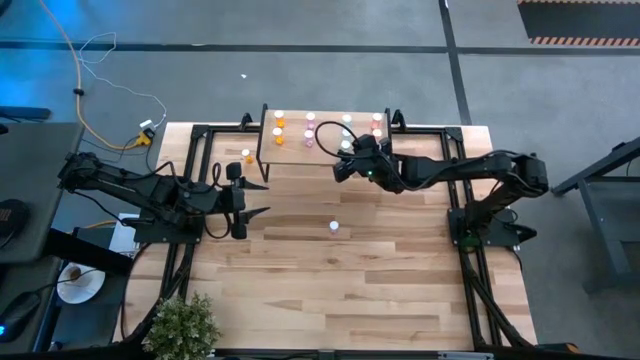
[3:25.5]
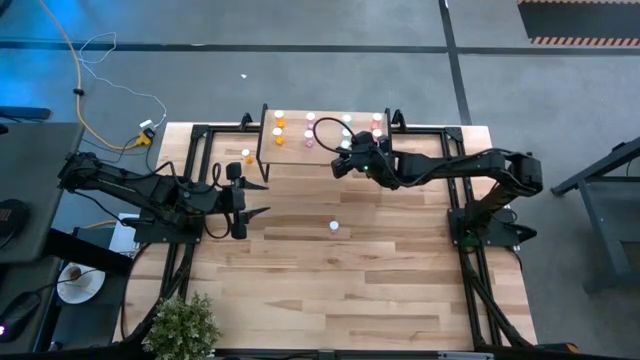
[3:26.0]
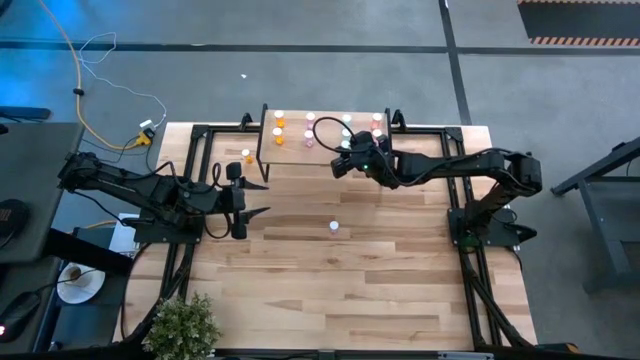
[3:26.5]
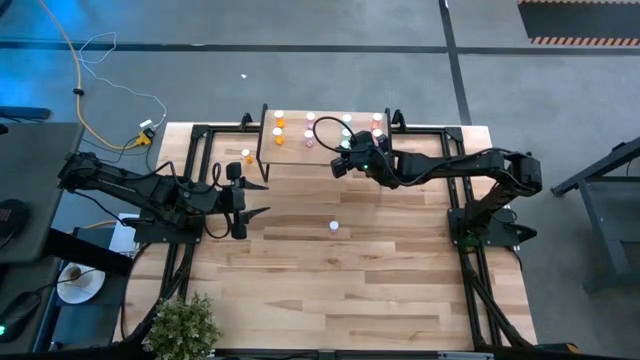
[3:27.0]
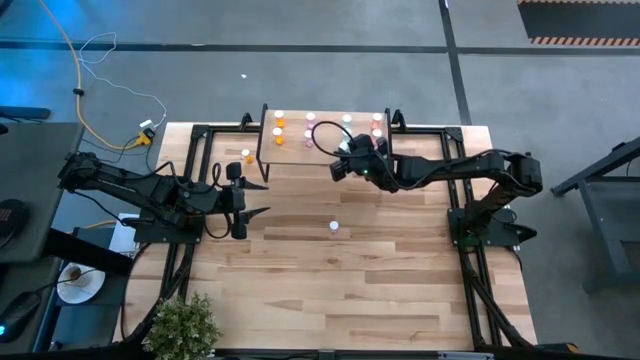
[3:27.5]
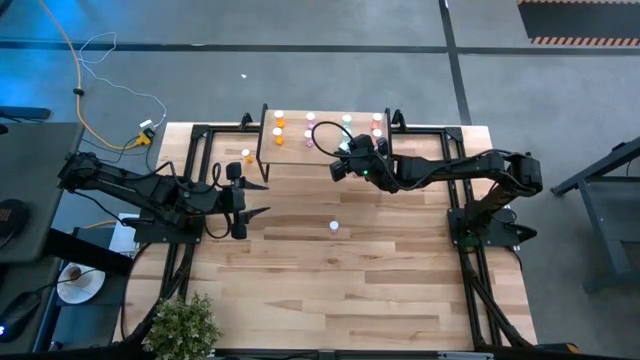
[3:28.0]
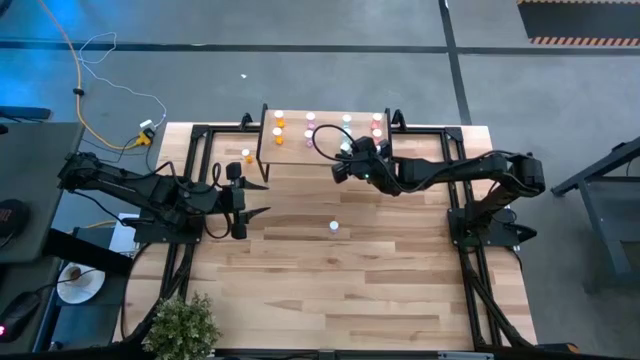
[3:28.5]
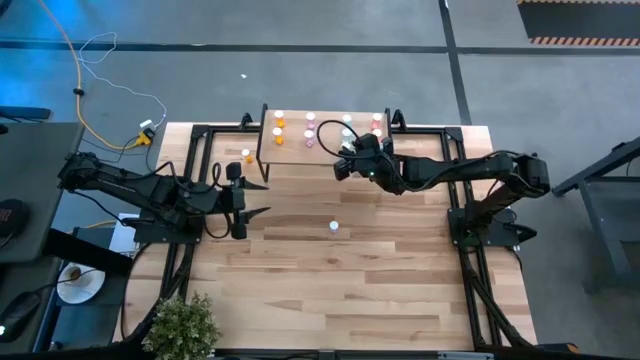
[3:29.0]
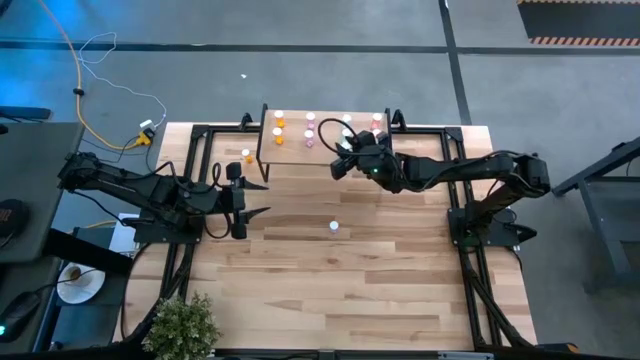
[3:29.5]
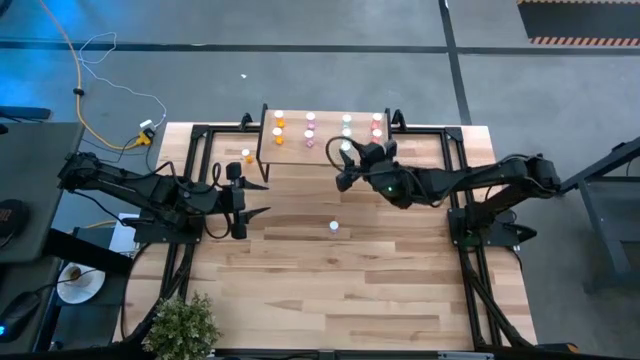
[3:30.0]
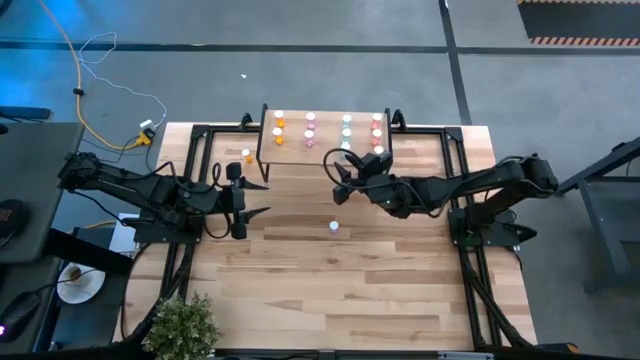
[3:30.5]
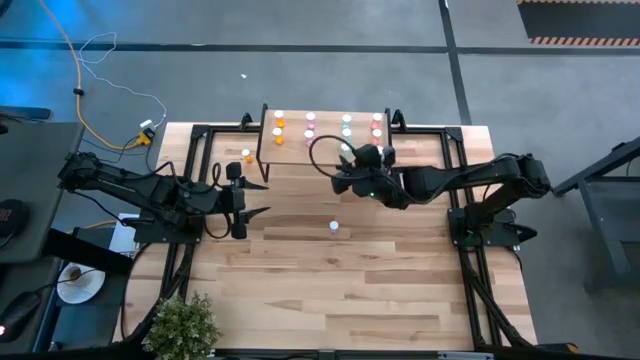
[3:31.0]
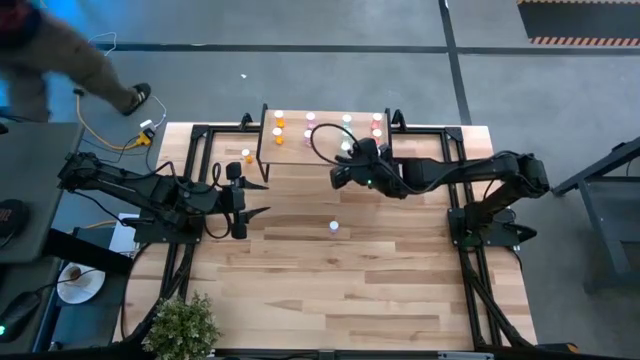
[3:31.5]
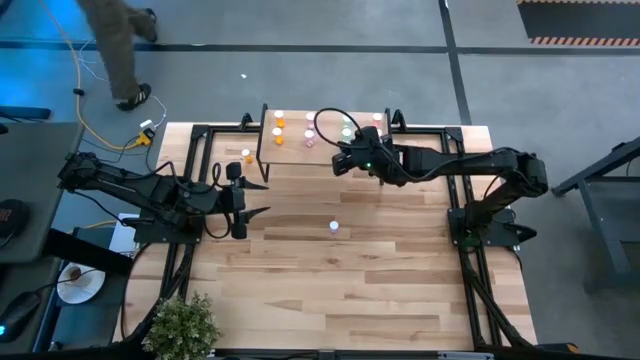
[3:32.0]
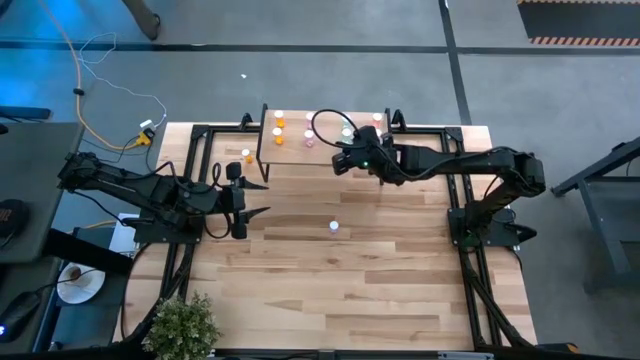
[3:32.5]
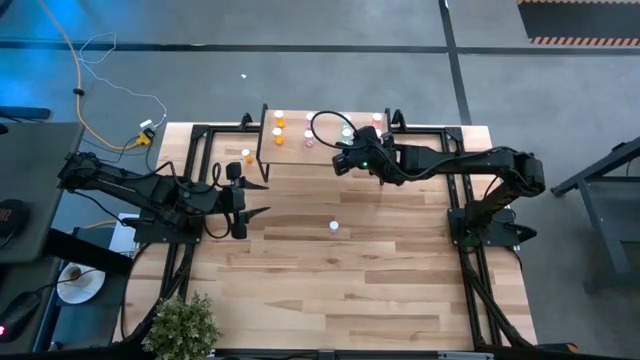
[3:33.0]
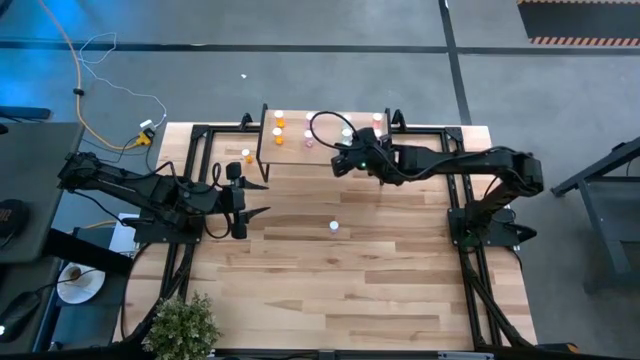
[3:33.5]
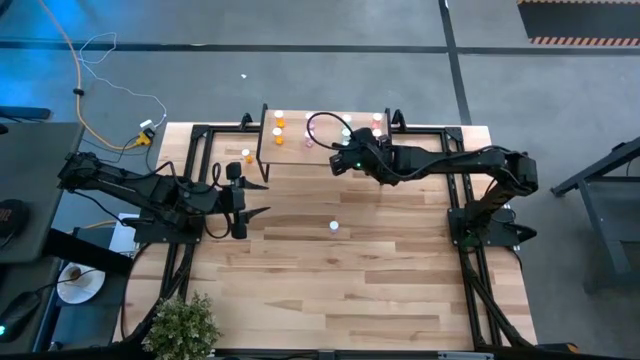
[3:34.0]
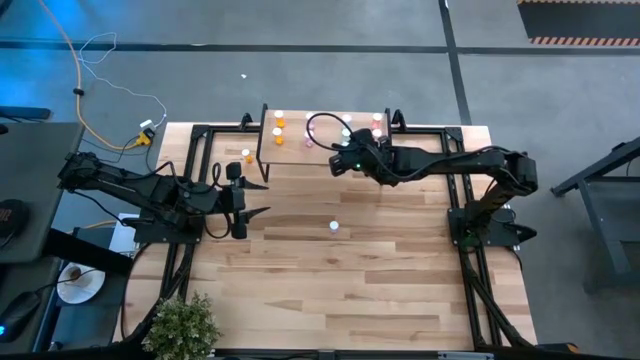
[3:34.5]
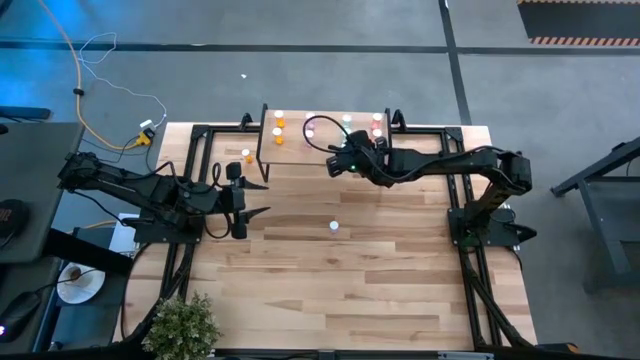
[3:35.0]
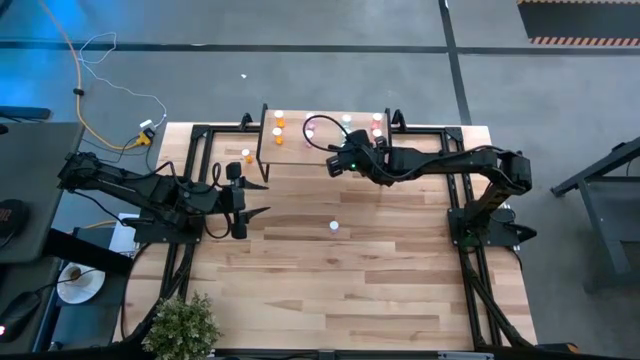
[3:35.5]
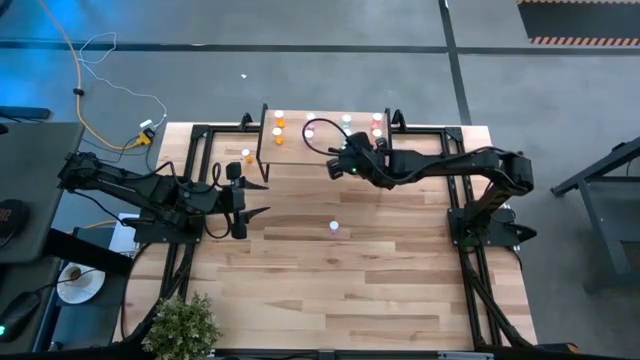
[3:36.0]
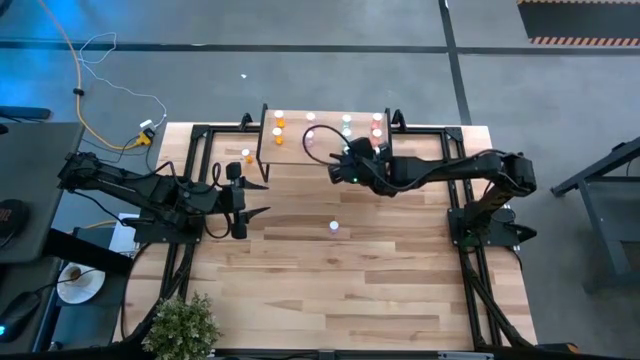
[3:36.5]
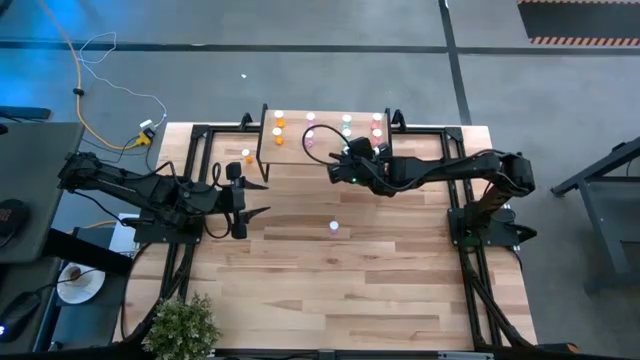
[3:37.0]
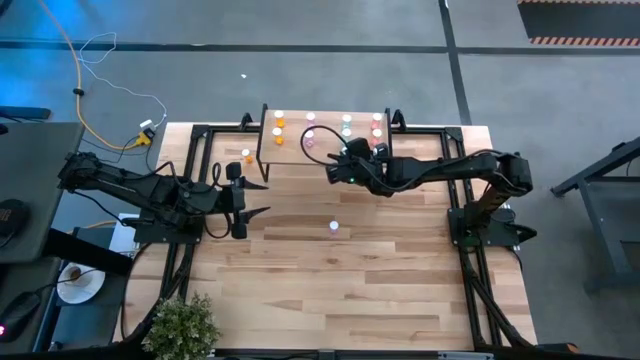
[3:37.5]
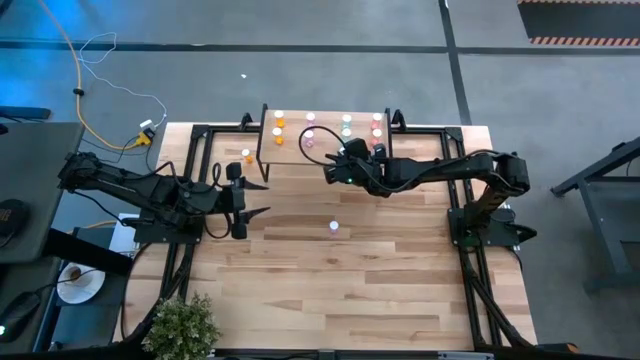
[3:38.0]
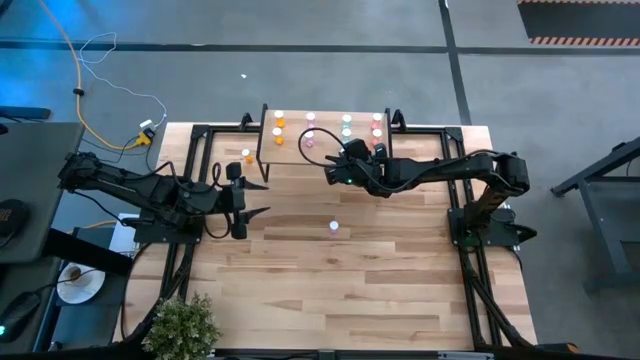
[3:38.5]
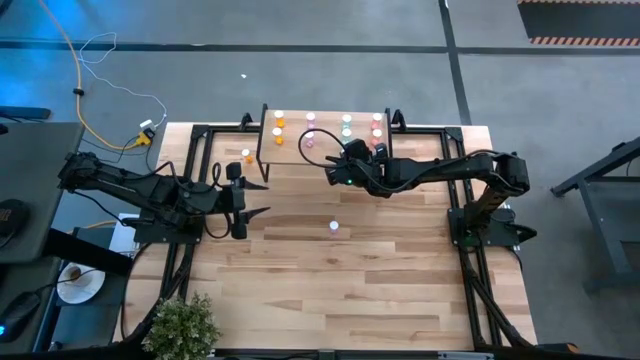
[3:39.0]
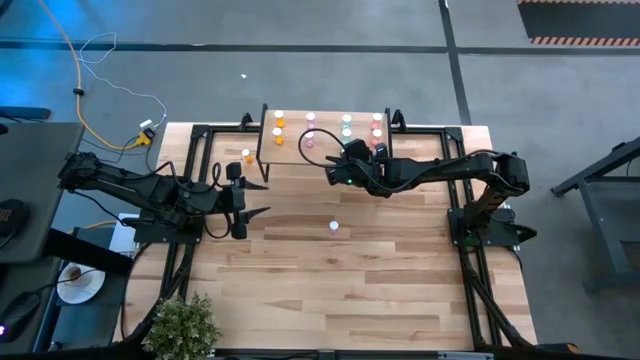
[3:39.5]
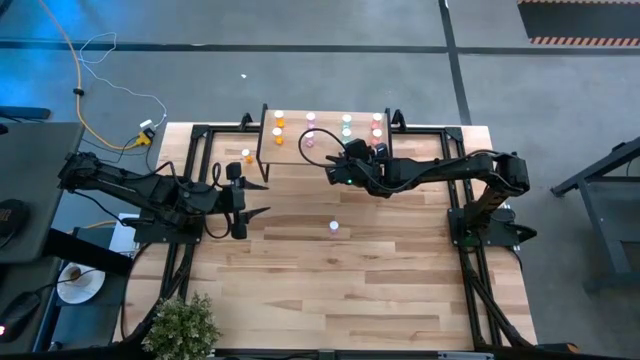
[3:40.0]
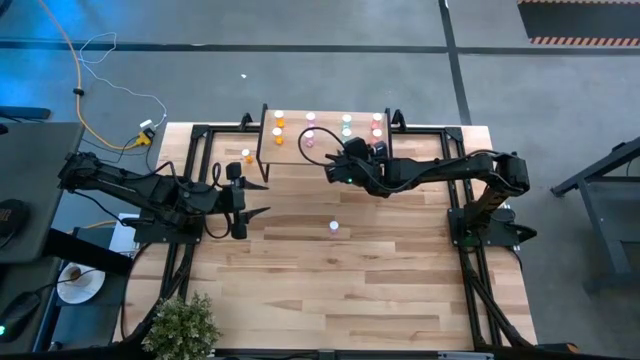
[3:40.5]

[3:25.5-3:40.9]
Task: Pick and place medicine bottles onto shelf by color
Adjust the green pill bottles on the shelf

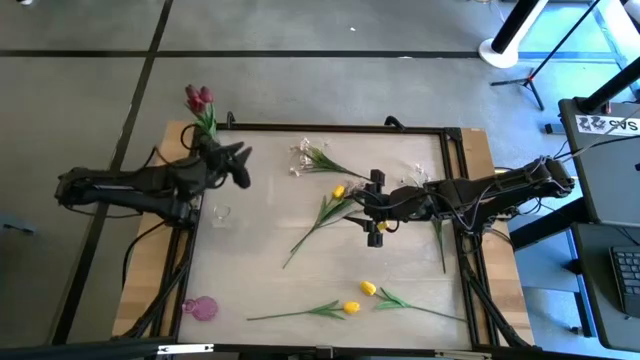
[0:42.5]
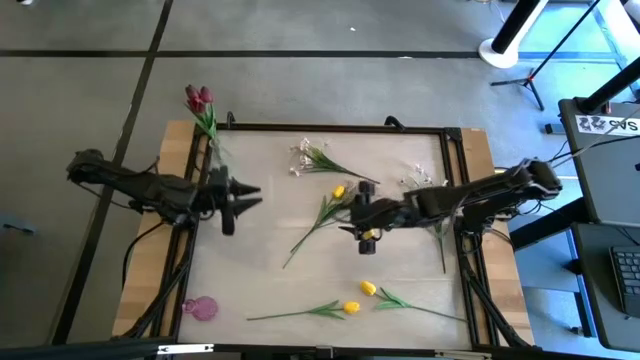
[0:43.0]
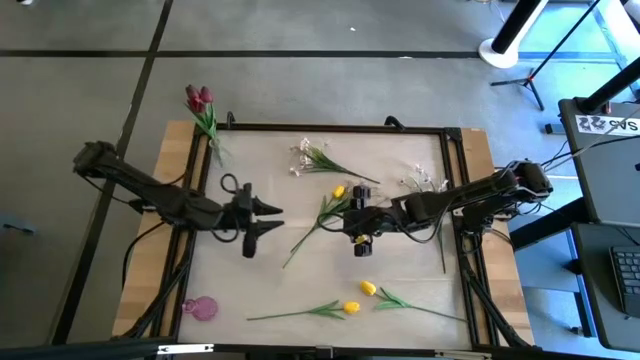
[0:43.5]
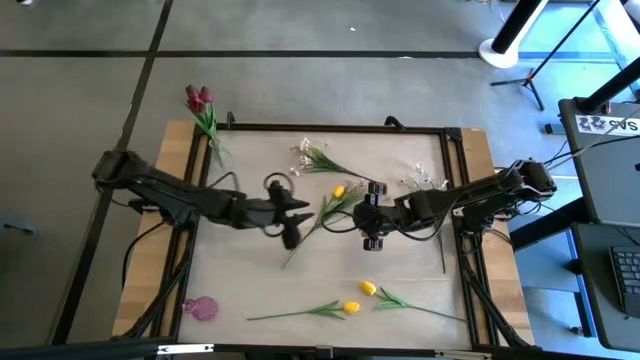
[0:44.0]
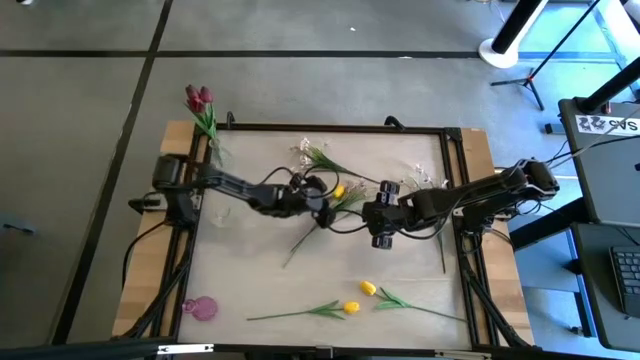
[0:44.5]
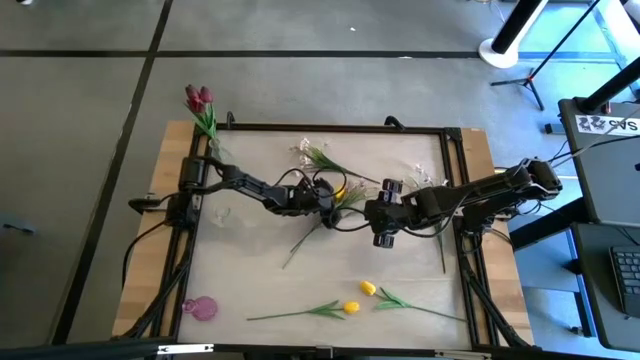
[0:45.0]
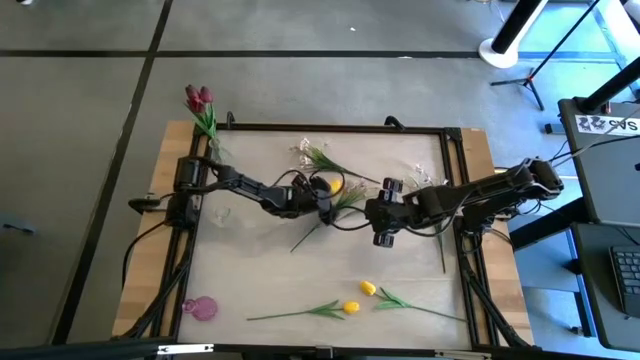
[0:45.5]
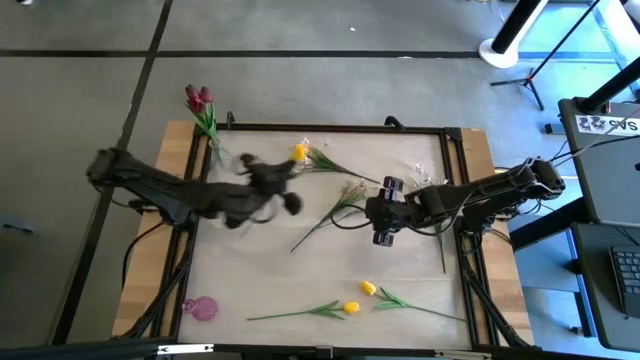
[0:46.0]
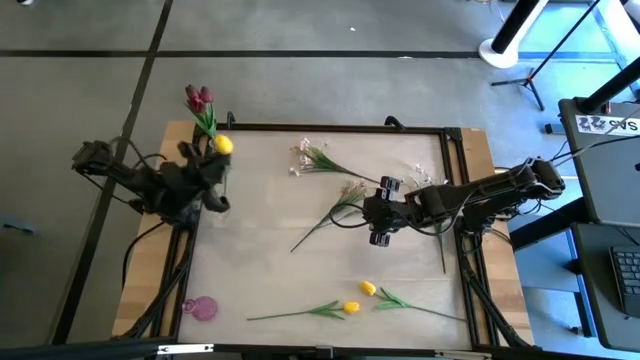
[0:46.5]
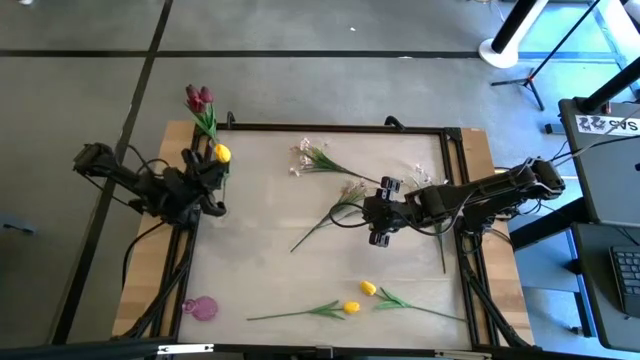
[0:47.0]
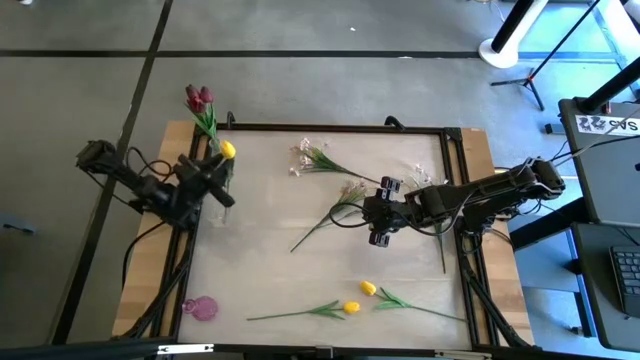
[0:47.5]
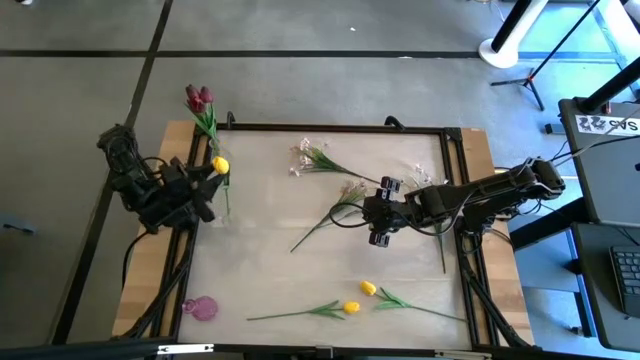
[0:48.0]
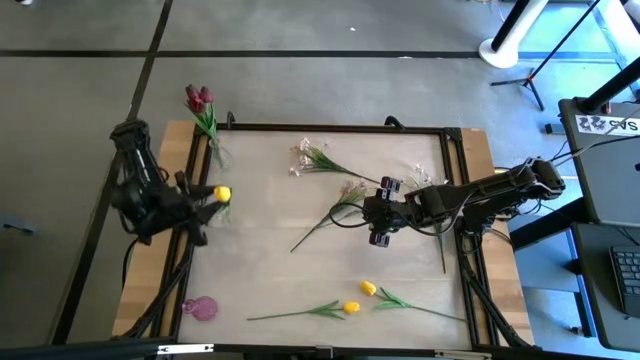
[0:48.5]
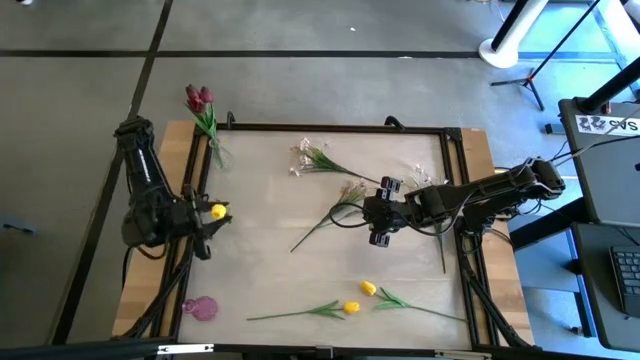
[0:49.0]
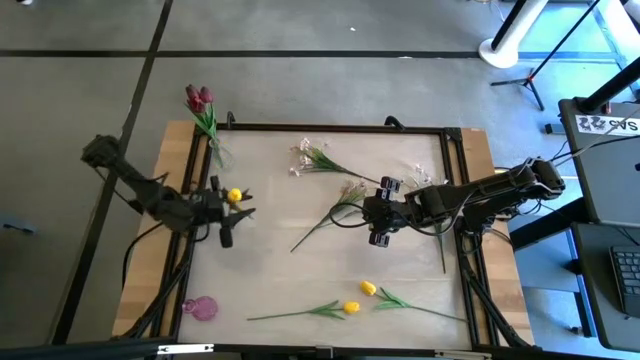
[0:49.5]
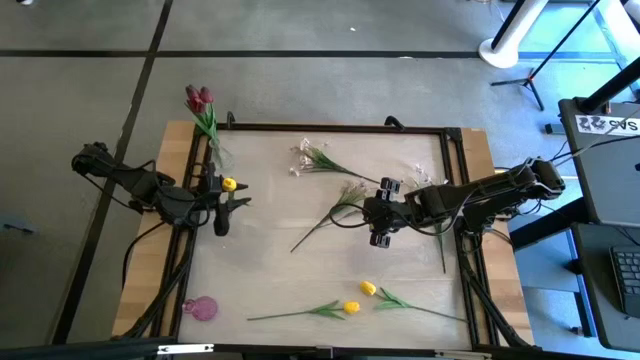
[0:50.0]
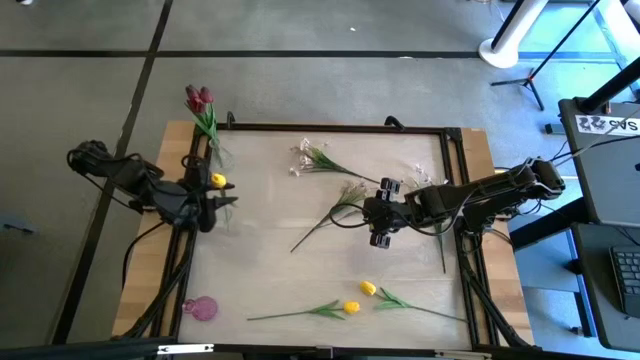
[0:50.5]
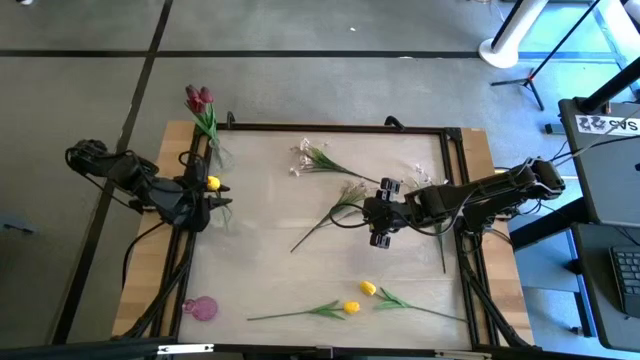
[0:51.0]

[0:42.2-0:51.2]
Task: Sort flowers into vase by color
Put the top yellow flower into the bottom transparent vase
